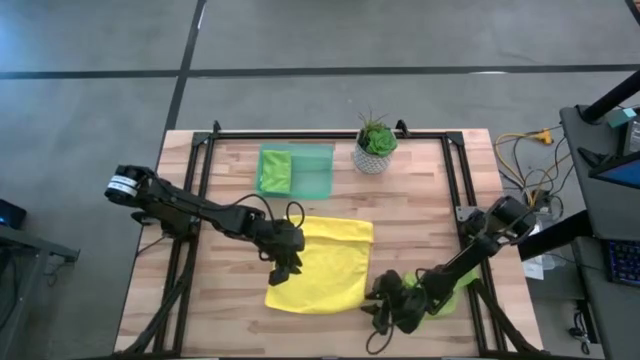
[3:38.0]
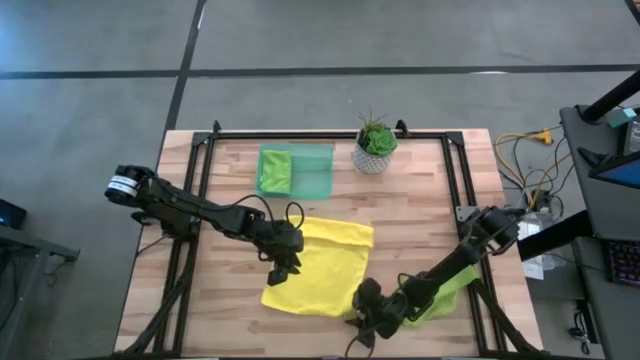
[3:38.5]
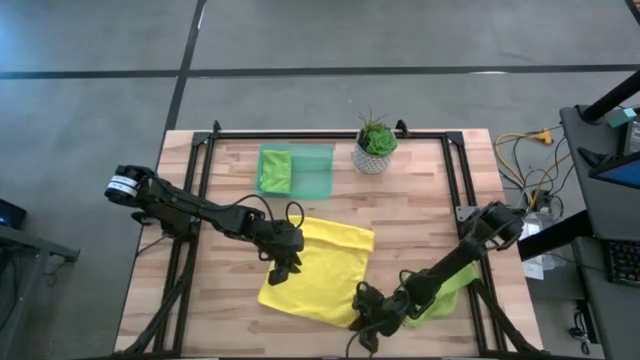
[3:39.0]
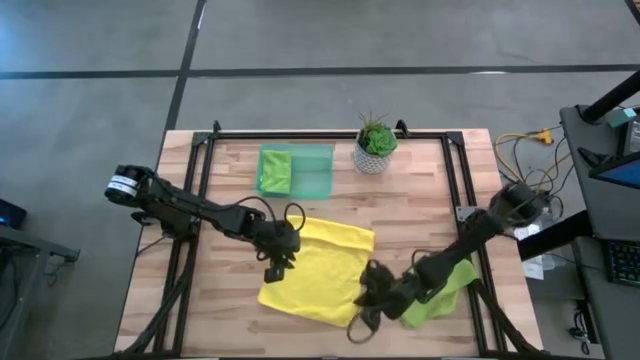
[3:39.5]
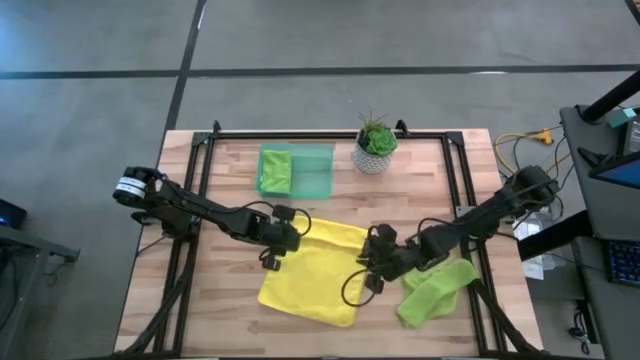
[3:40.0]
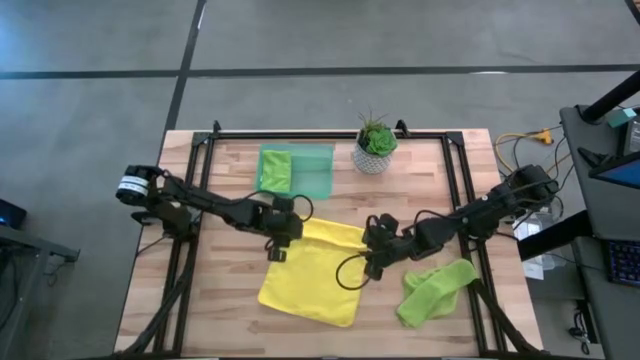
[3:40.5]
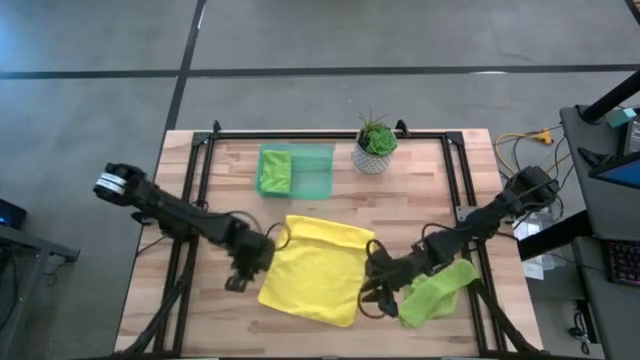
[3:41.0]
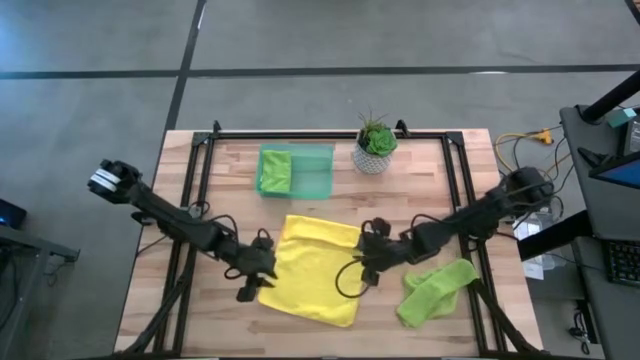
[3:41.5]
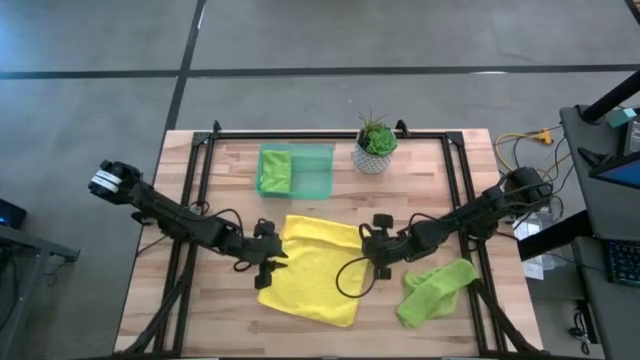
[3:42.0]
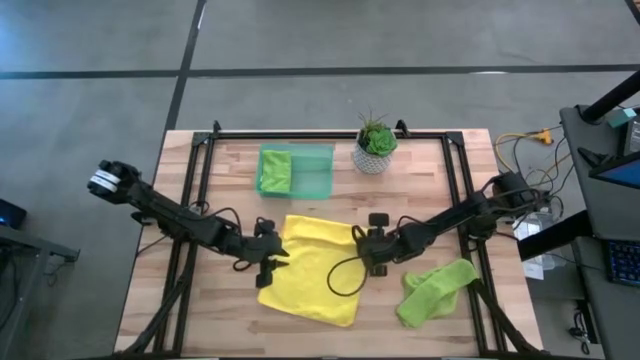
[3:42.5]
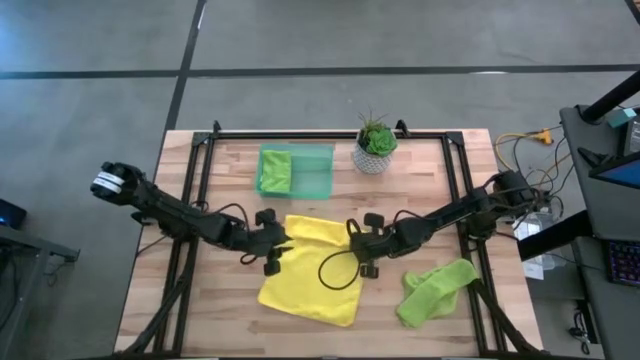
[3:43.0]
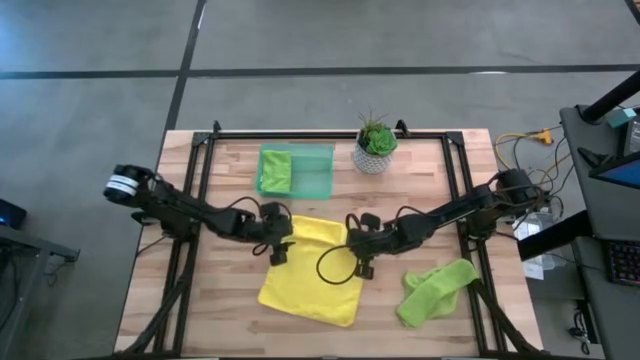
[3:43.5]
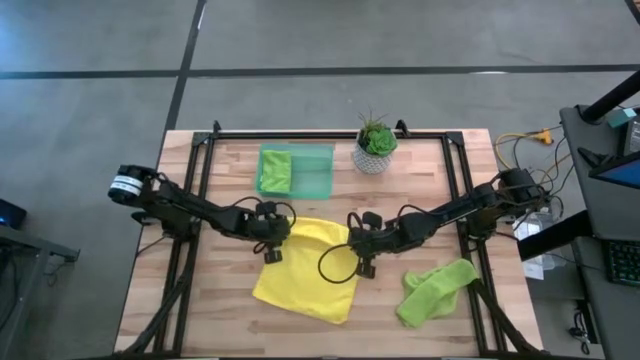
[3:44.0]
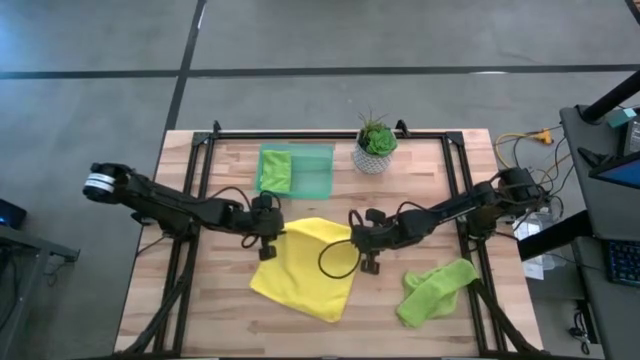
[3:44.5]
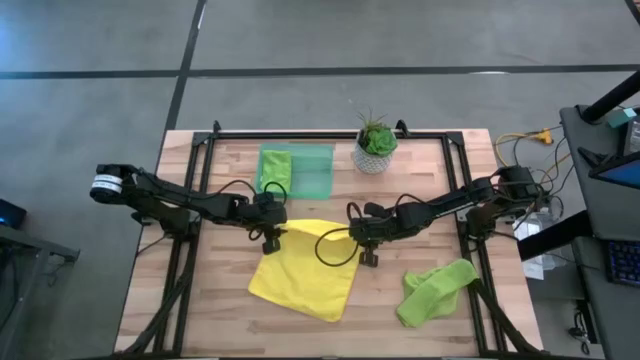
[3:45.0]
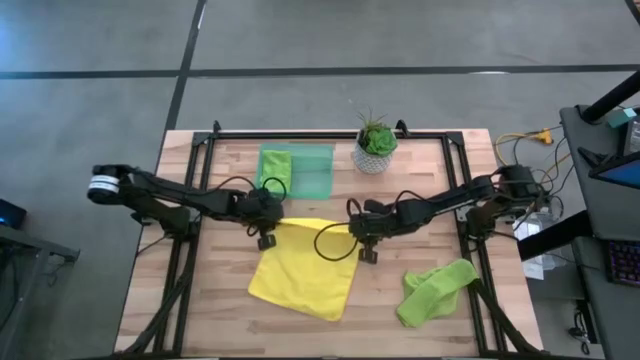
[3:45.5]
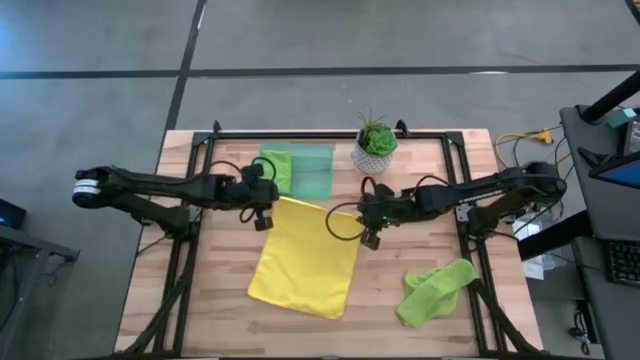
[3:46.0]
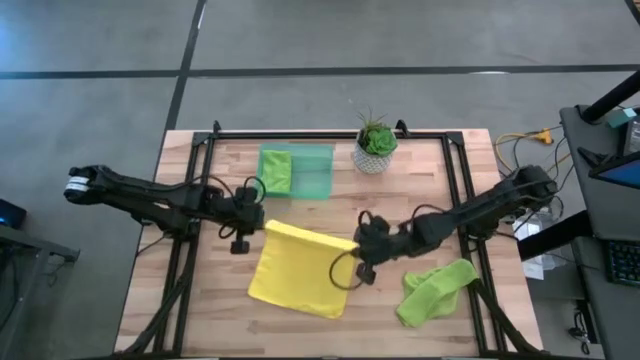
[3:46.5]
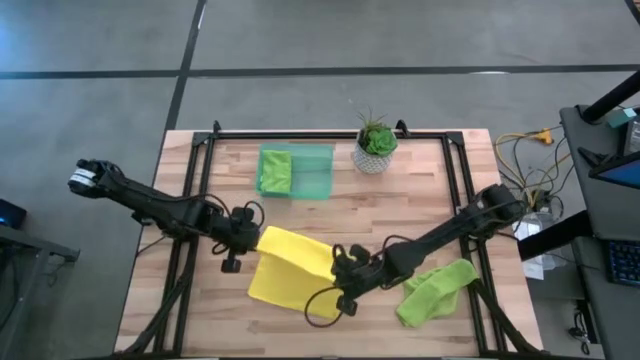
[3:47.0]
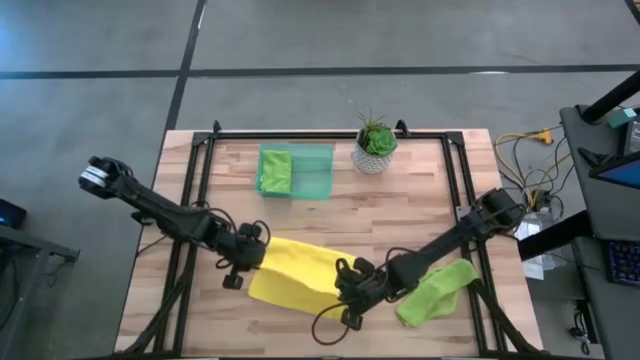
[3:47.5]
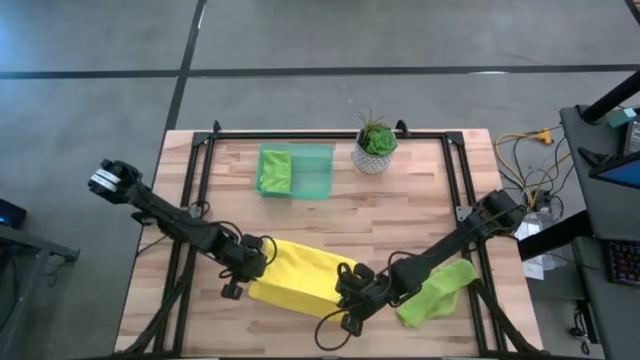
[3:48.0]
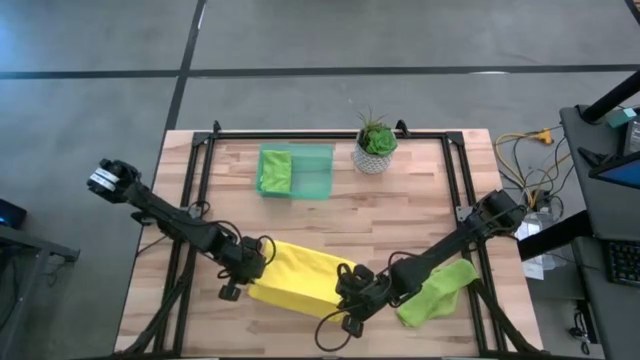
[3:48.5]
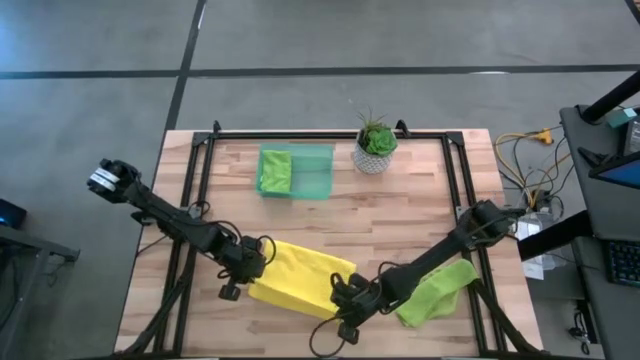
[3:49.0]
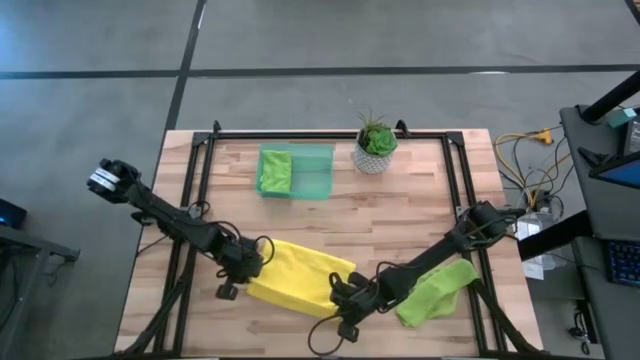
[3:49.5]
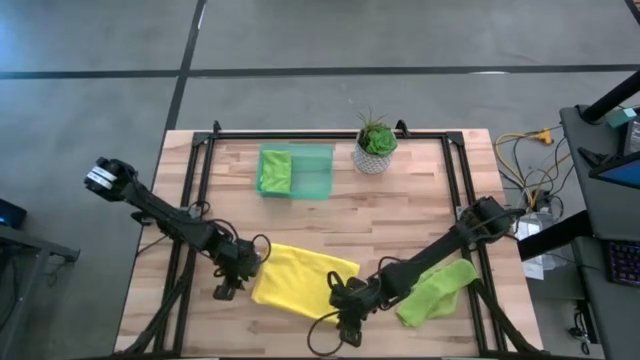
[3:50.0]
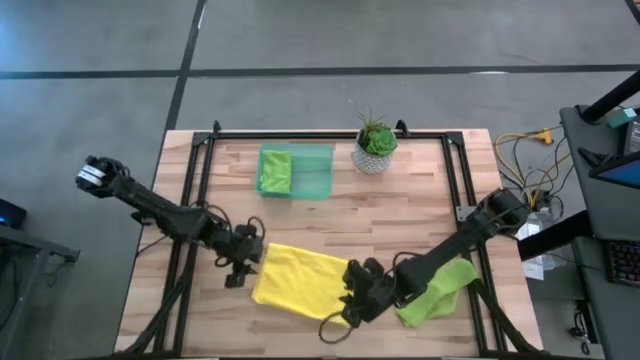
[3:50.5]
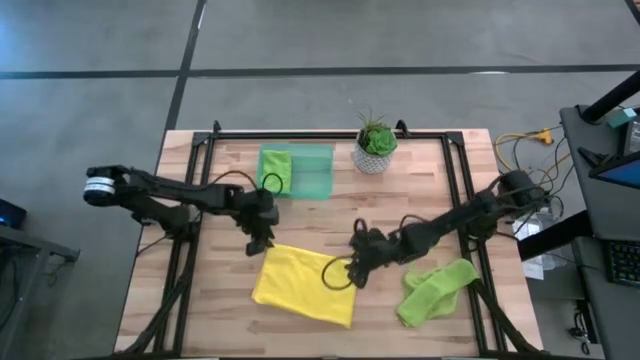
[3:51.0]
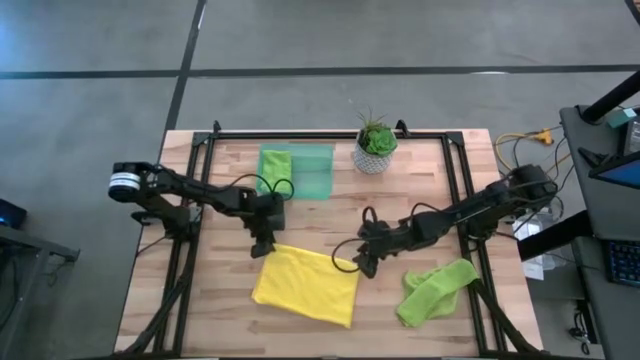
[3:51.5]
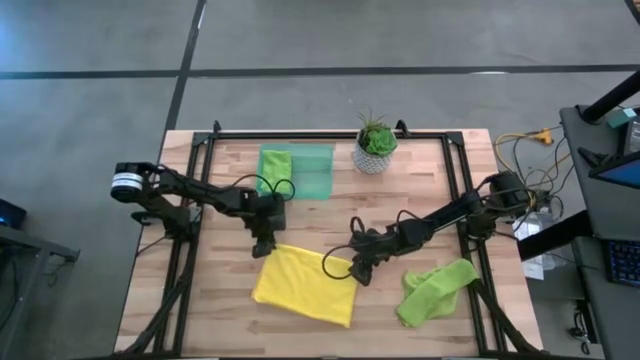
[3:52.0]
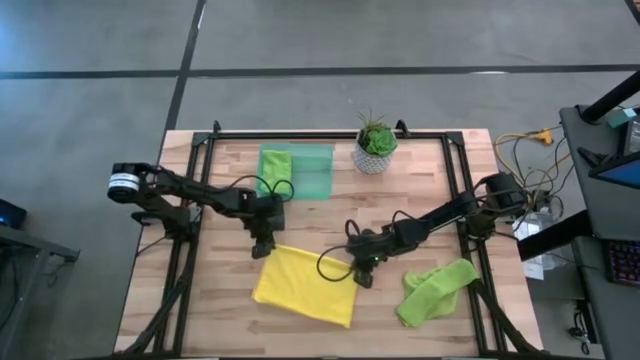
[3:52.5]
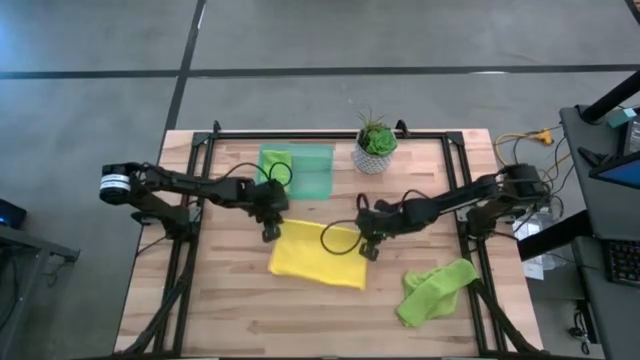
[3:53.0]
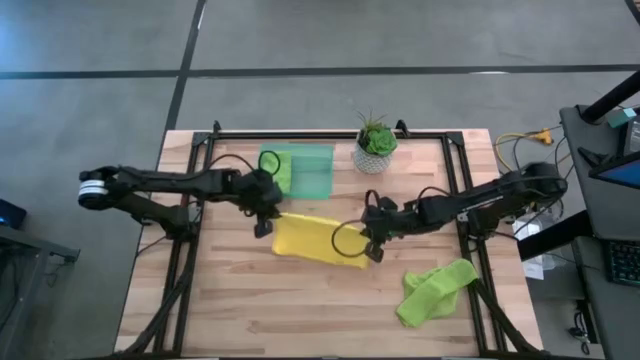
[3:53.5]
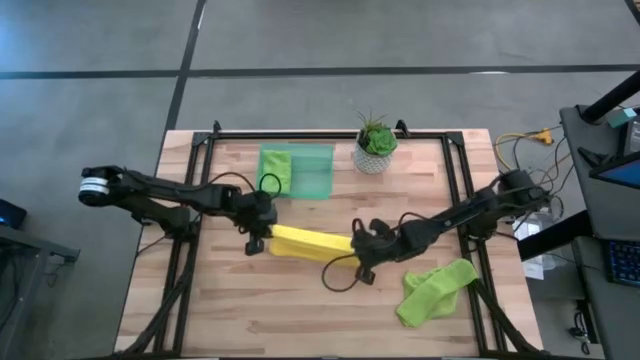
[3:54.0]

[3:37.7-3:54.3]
Task: Fold microfiber towels
Fold the yellow microfiber towel
